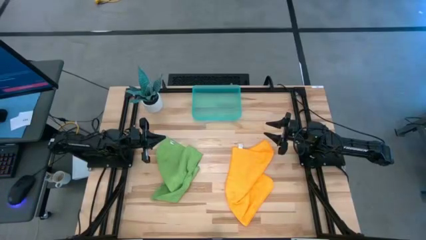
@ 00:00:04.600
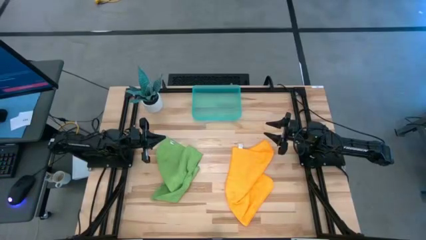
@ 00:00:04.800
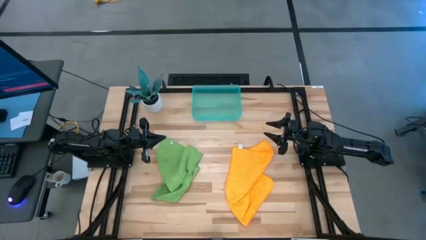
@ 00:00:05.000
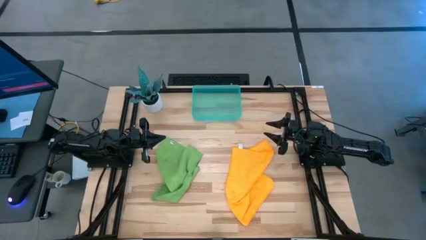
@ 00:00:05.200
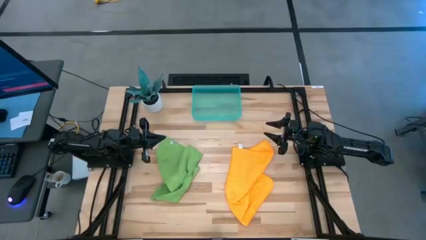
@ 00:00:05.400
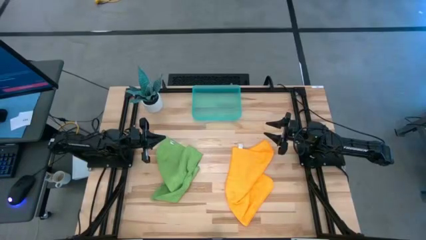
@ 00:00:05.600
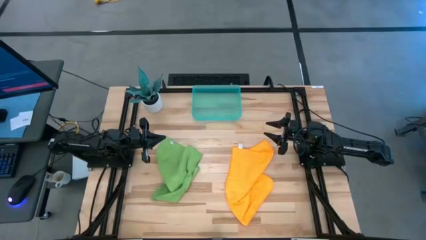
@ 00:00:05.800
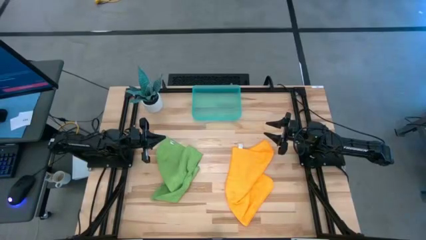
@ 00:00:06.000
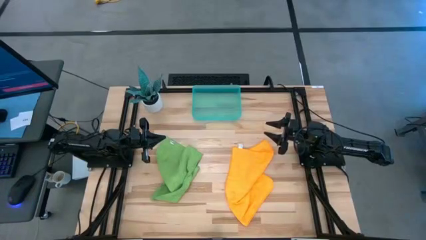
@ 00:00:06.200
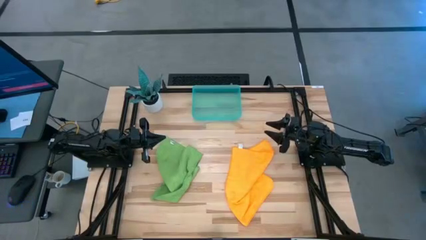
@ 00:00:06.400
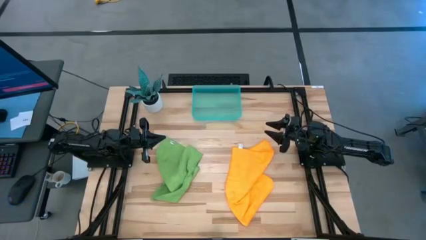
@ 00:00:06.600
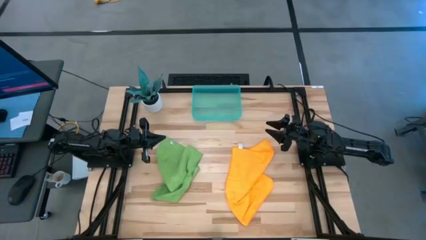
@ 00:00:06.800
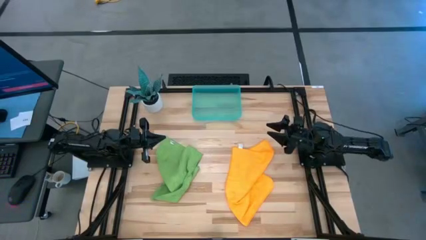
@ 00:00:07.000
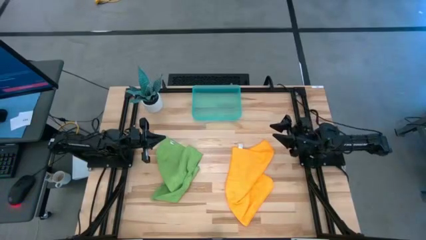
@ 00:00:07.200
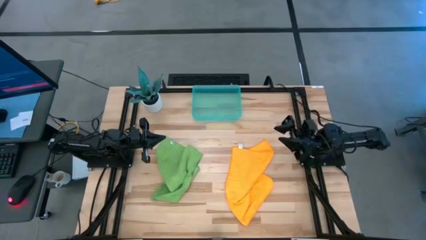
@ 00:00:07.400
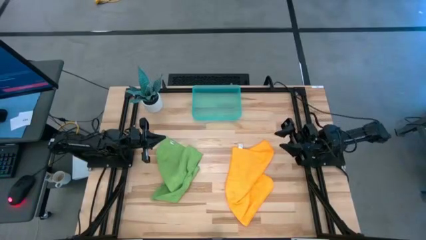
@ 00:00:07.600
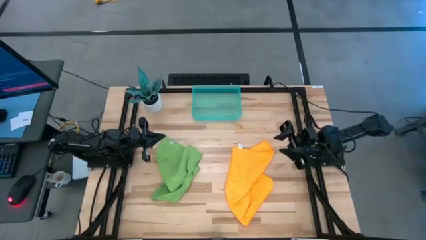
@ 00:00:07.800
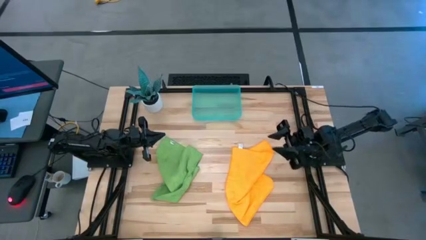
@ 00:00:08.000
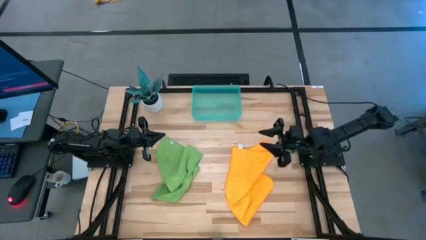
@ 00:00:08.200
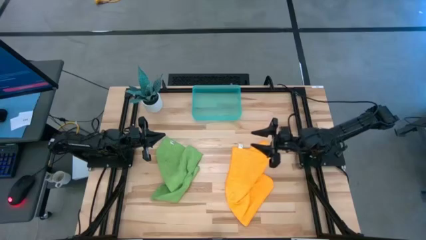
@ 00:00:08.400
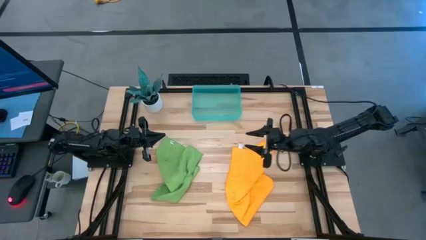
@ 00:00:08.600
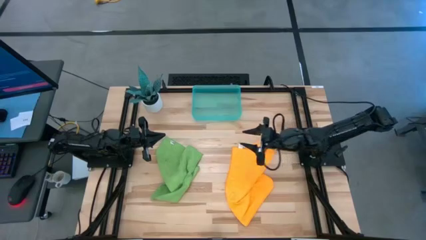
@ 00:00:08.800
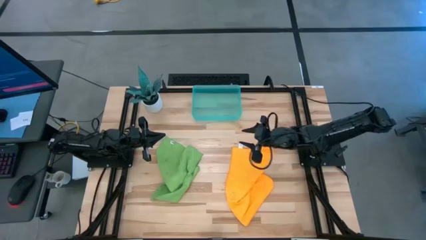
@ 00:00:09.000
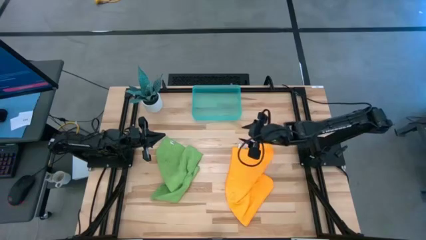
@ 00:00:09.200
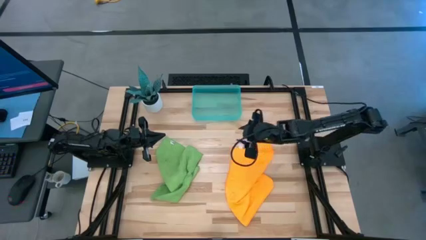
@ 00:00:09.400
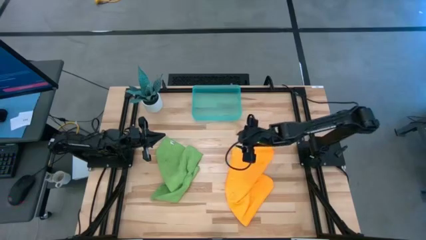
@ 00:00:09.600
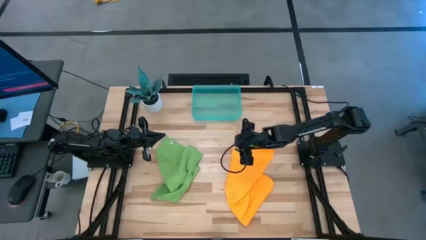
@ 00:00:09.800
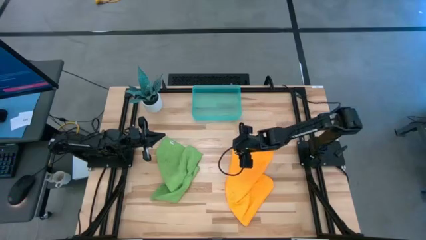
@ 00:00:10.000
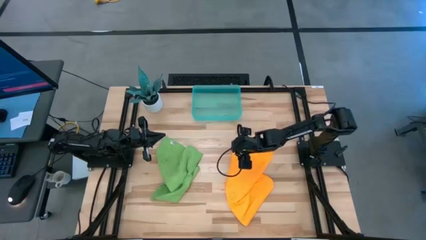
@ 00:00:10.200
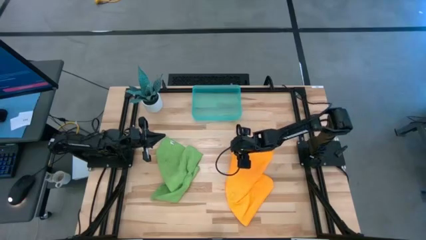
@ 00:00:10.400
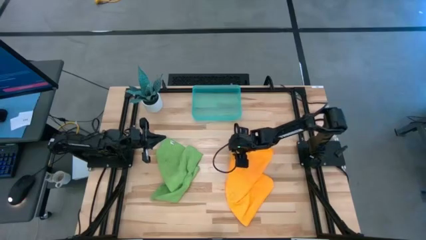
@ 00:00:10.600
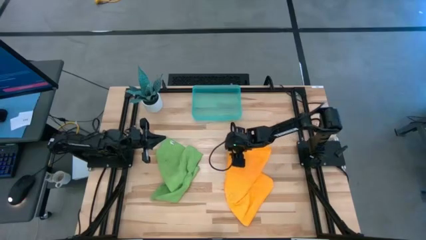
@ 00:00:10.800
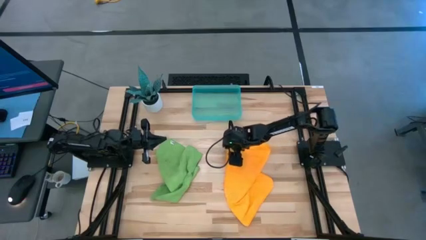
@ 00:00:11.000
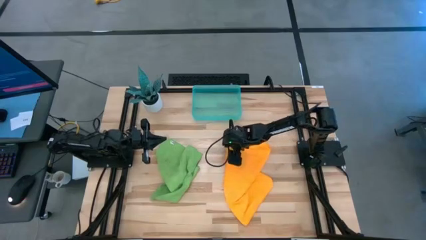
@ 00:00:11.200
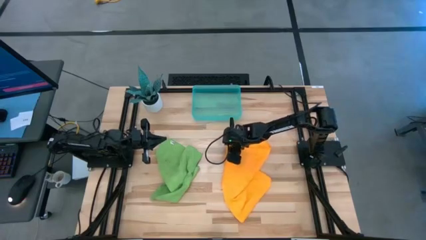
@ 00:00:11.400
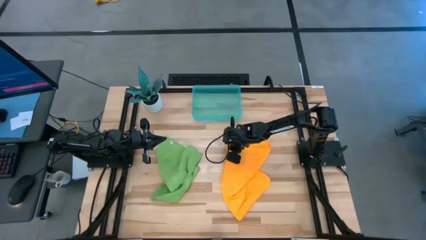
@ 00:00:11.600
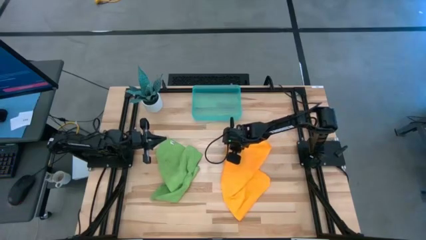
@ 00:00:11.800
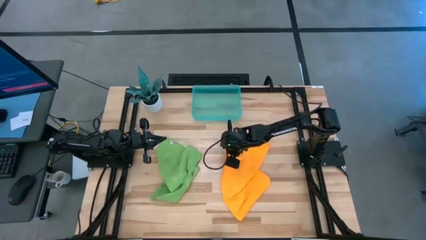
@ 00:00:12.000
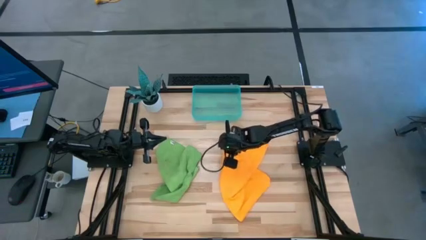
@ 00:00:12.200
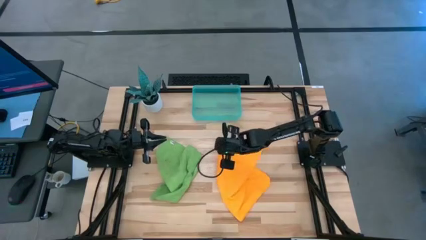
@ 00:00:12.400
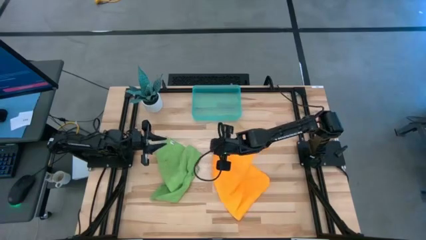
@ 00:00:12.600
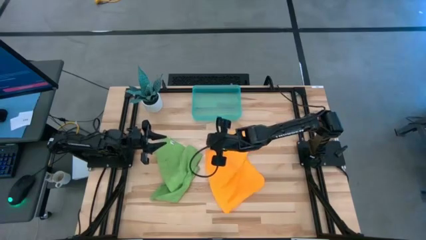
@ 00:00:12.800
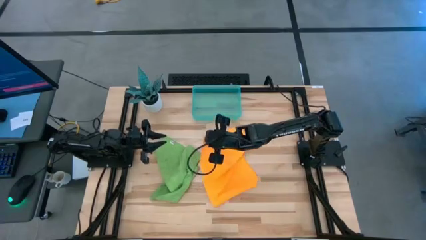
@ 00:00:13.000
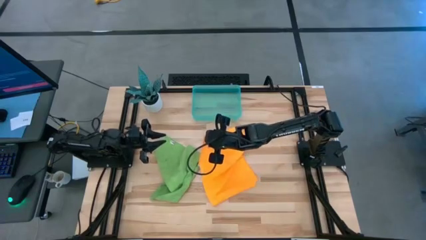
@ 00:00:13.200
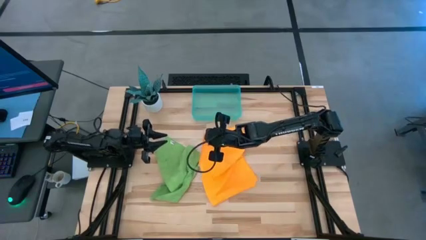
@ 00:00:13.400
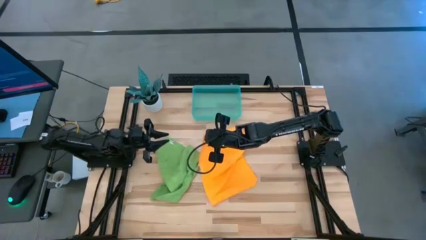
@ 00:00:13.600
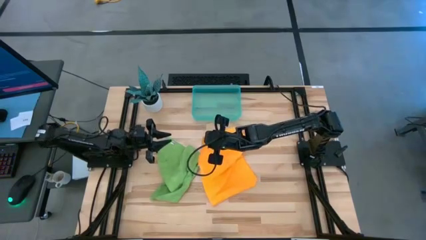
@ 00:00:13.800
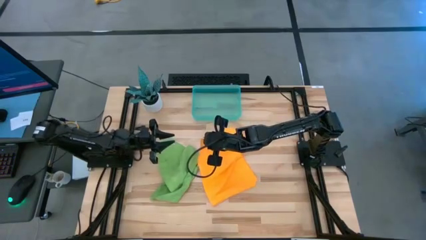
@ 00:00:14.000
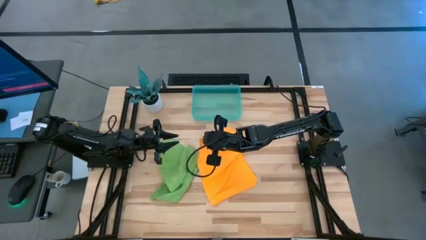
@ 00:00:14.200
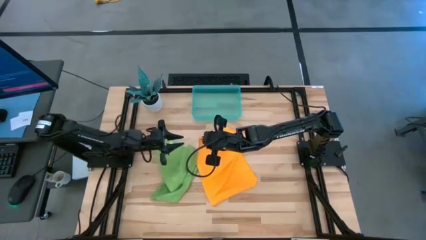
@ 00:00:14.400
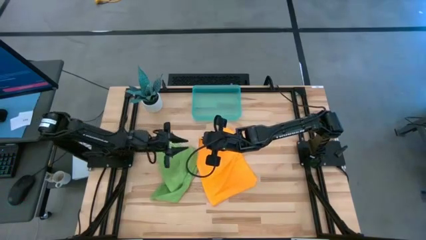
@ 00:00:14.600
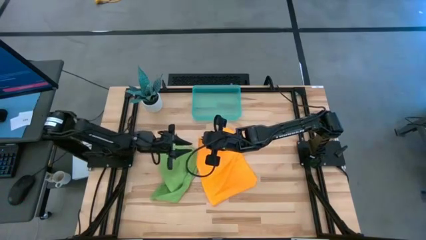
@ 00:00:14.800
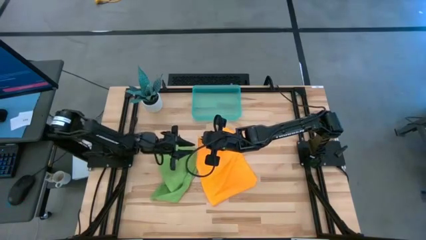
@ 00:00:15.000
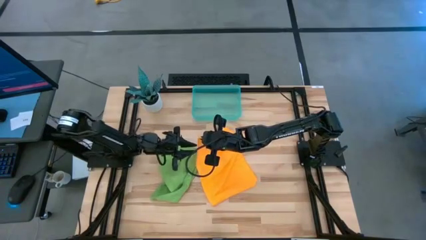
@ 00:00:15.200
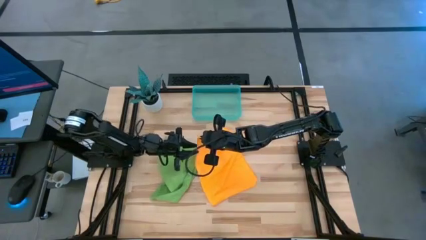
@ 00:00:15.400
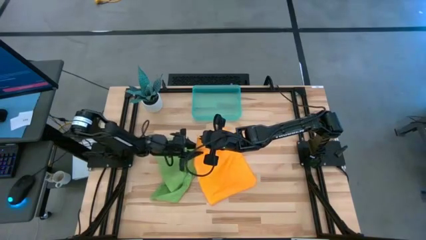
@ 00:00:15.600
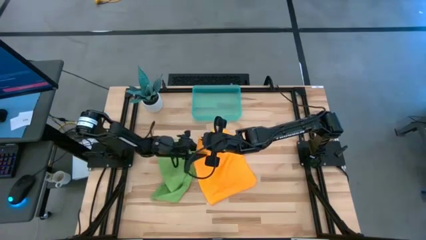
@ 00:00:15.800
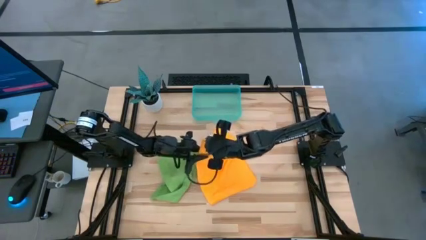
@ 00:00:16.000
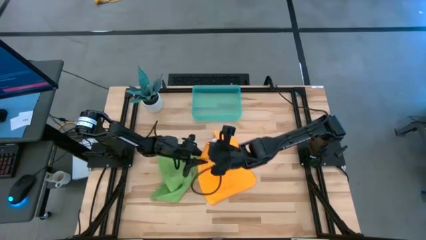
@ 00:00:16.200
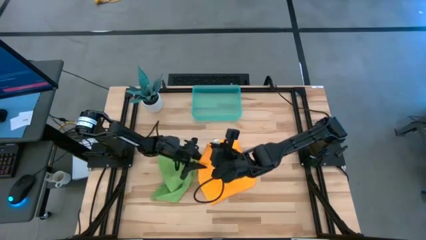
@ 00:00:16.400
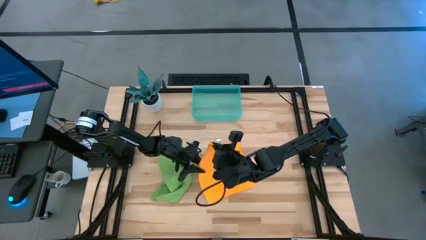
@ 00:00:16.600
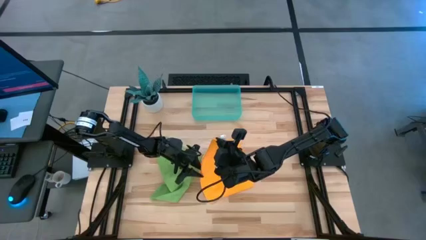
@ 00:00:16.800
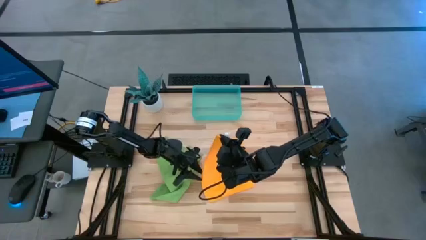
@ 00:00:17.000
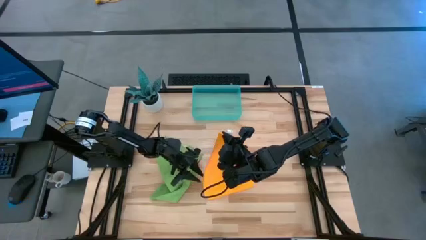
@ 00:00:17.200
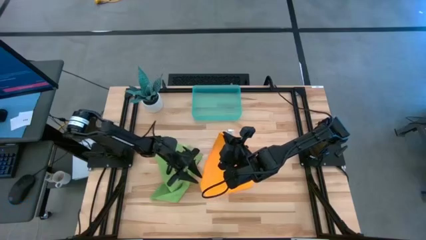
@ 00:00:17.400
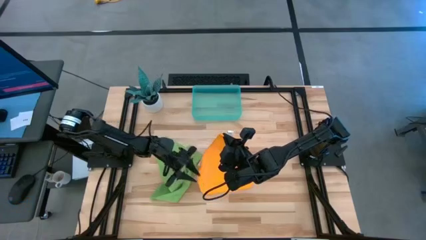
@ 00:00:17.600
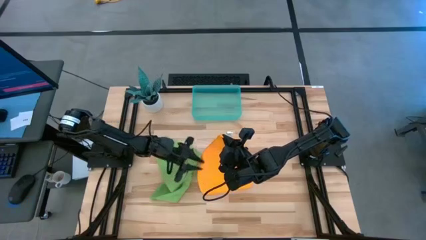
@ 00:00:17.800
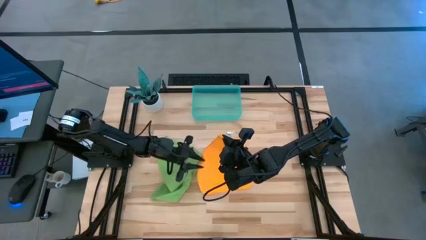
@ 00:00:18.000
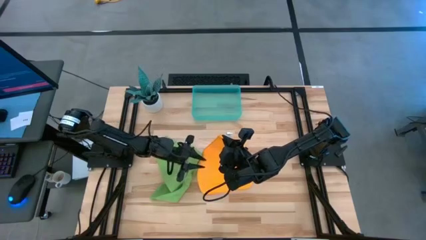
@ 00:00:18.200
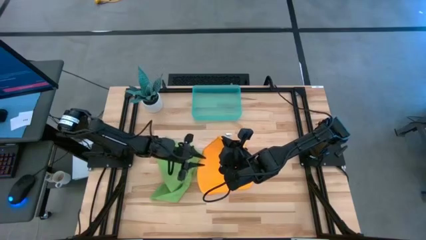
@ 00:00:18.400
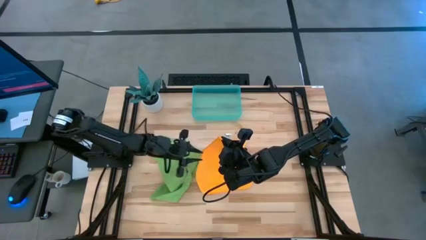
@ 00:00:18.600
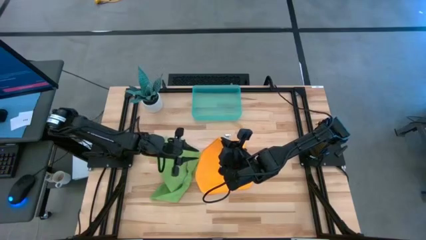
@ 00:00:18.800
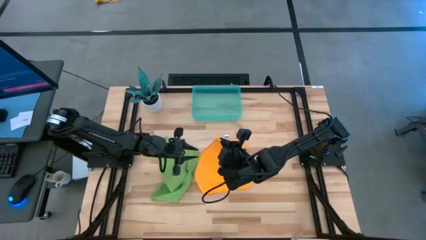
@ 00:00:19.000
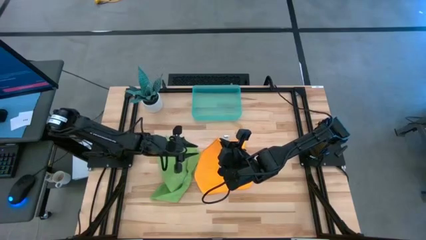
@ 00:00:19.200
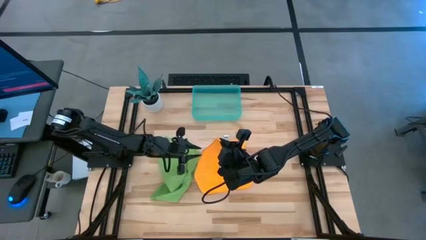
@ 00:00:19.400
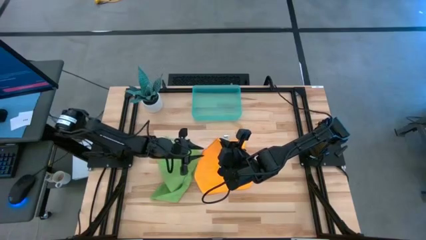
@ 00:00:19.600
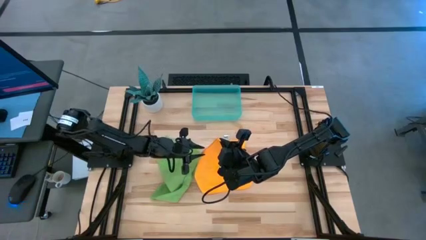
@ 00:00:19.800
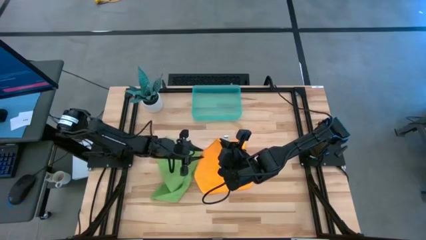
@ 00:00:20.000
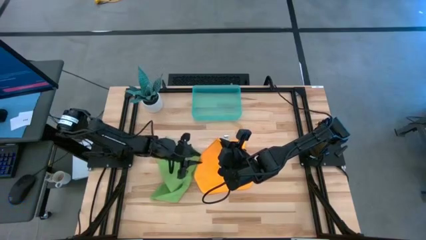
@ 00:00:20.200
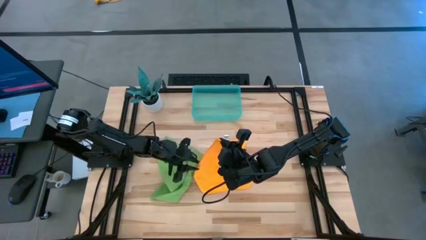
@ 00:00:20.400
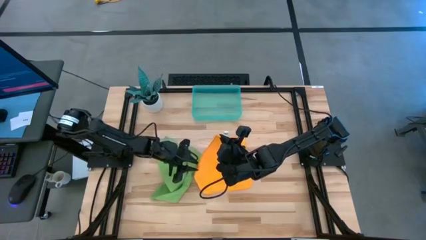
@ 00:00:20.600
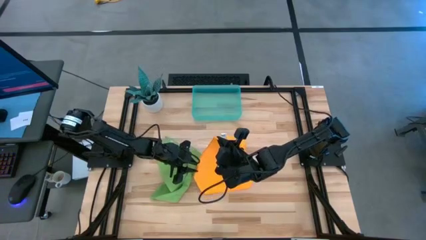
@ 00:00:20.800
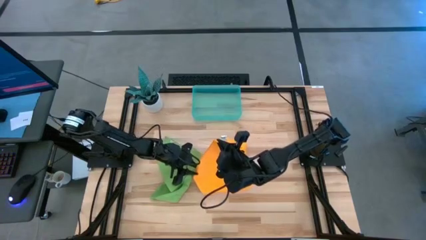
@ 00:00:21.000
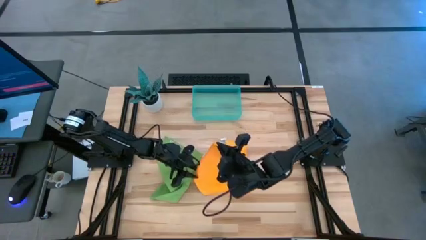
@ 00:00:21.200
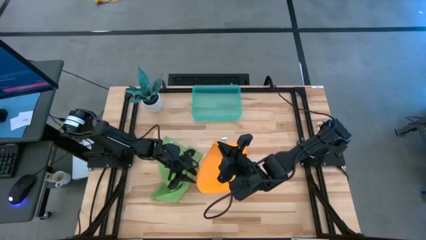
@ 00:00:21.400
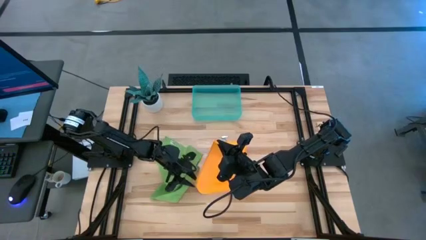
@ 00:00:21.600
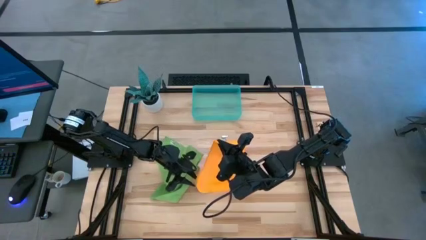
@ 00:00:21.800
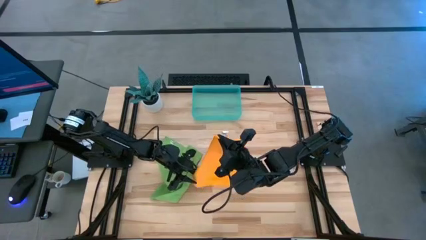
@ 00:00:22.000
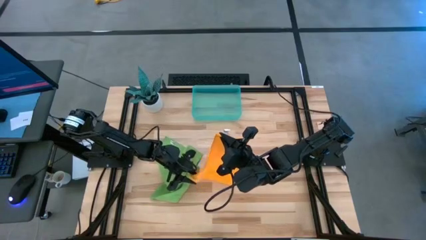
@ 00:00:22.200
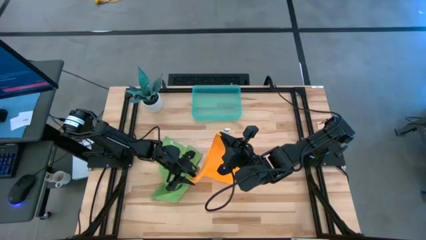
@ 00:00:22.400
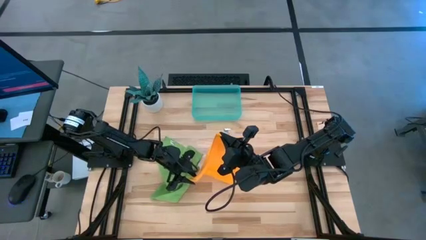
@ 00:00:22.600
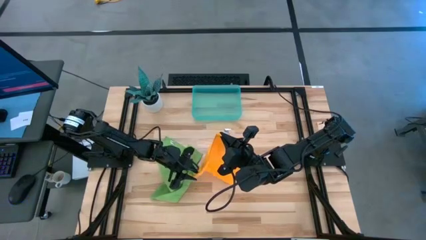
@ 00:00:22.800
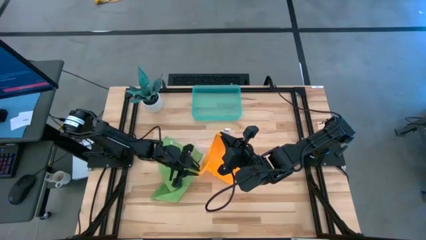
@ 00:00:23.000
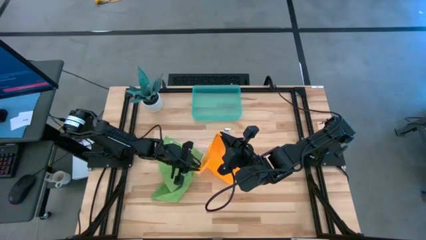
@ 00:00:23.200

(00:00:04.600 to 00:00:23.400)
Task: Roll microfiber towels into tight, uniform cylinder then place into a basket
Roll the orange microfiber cloth
